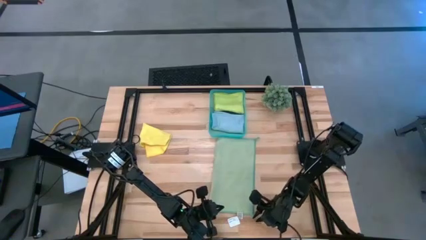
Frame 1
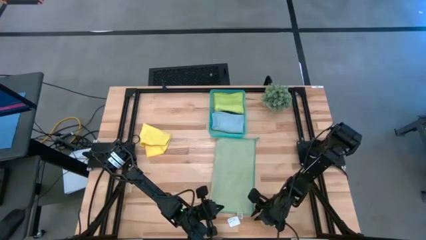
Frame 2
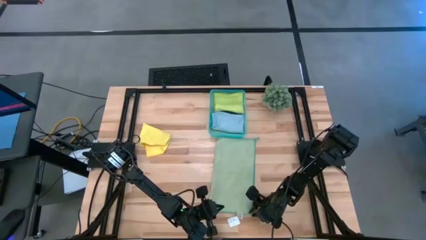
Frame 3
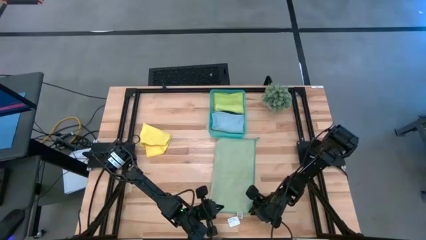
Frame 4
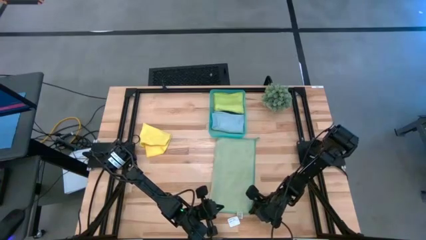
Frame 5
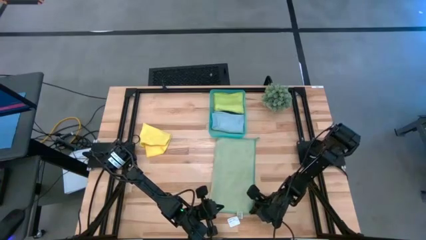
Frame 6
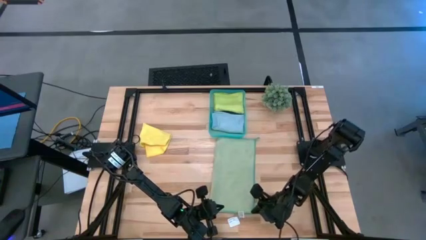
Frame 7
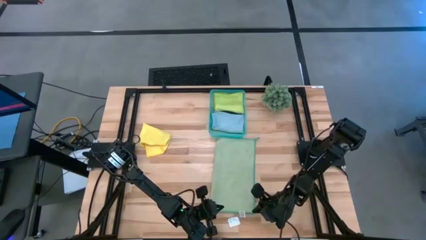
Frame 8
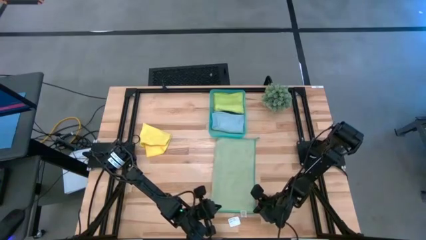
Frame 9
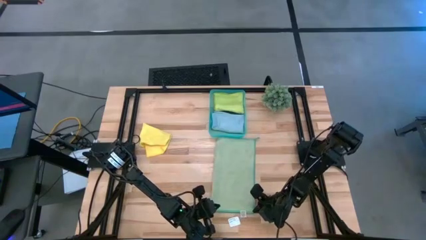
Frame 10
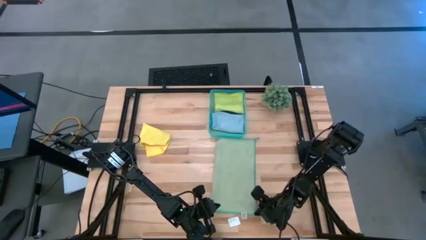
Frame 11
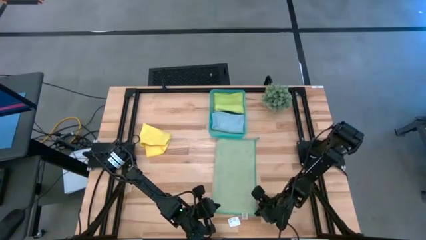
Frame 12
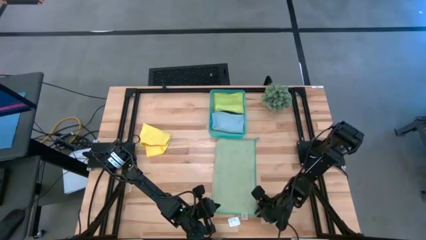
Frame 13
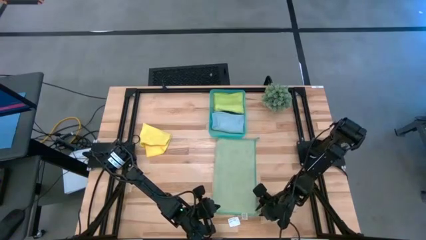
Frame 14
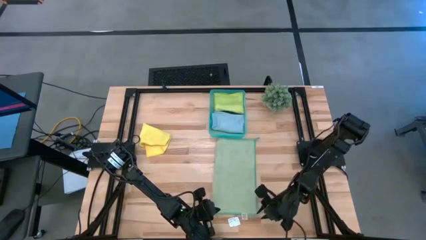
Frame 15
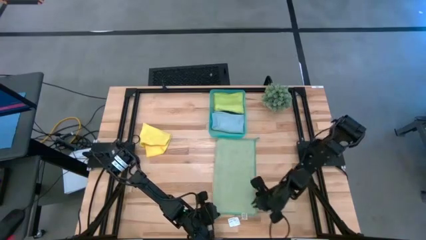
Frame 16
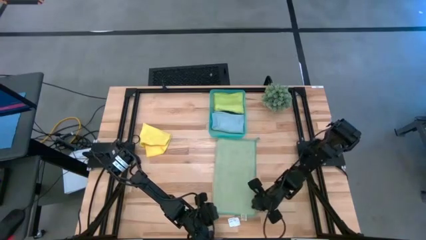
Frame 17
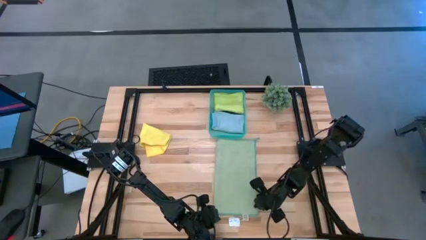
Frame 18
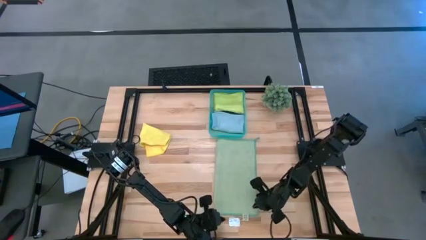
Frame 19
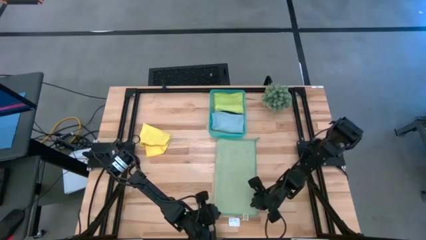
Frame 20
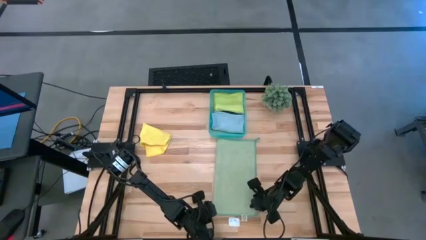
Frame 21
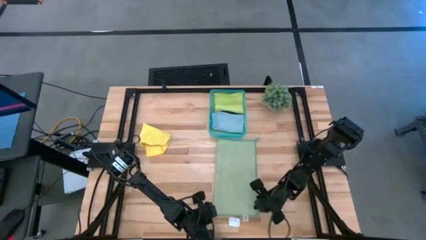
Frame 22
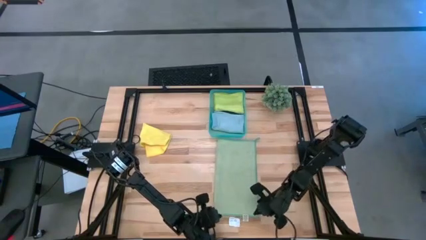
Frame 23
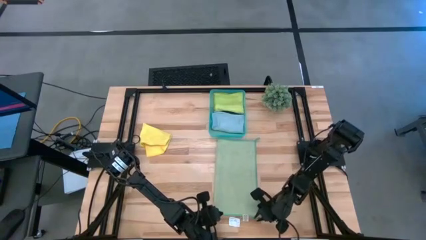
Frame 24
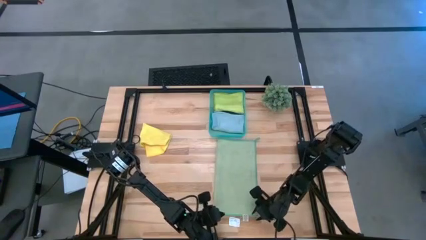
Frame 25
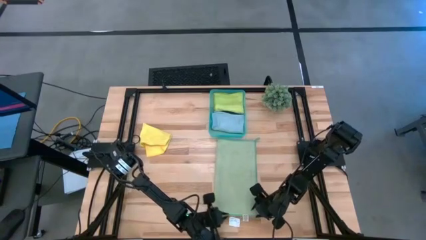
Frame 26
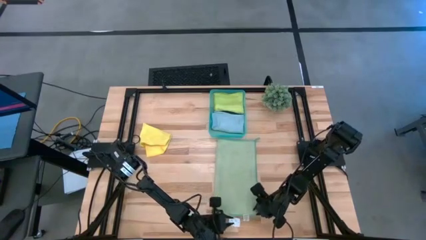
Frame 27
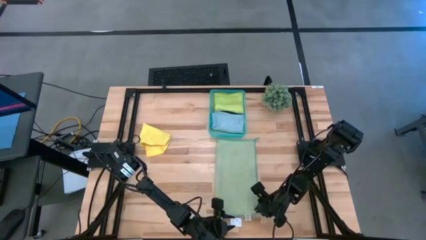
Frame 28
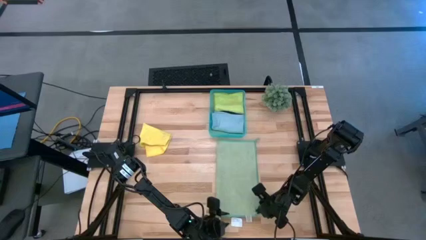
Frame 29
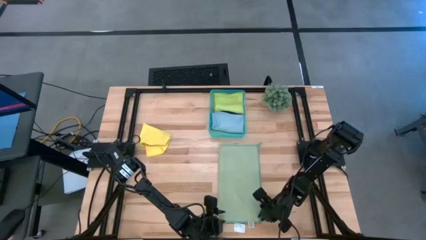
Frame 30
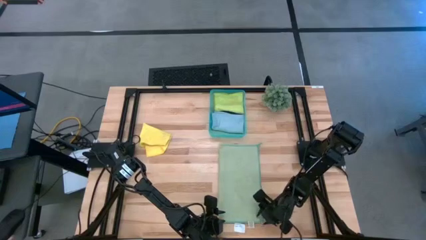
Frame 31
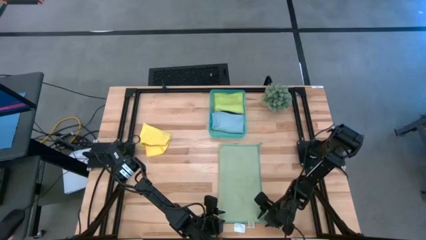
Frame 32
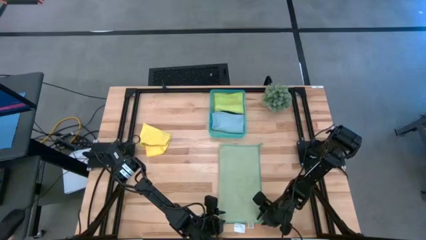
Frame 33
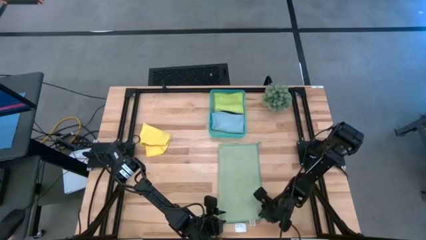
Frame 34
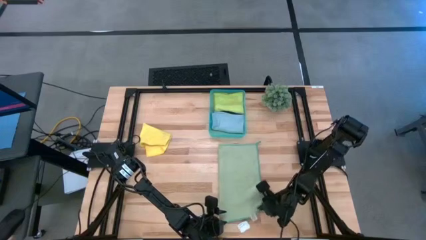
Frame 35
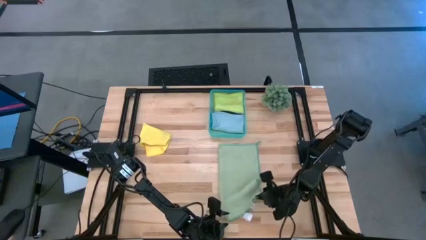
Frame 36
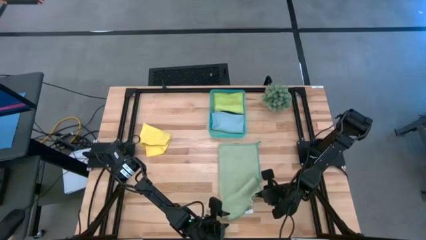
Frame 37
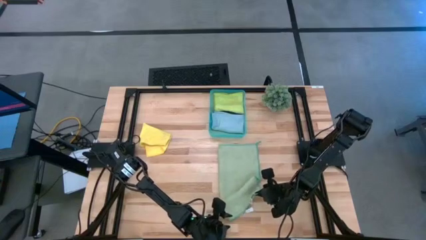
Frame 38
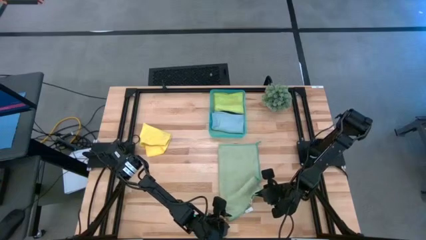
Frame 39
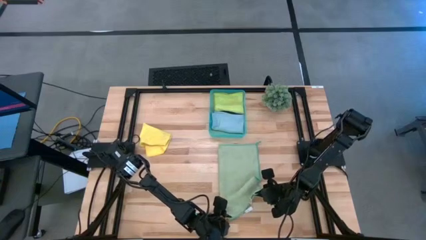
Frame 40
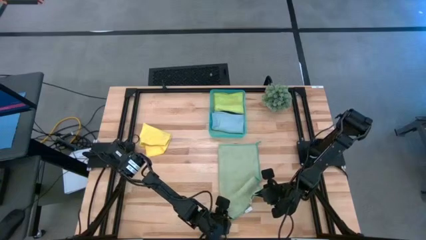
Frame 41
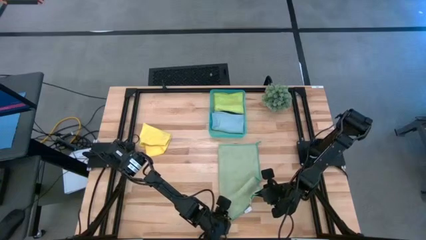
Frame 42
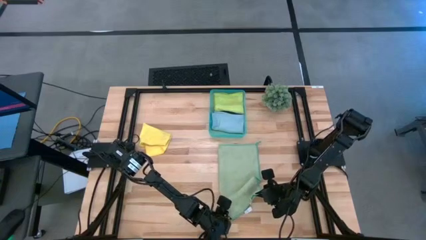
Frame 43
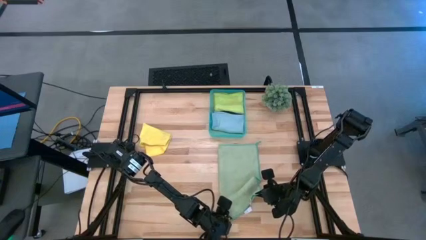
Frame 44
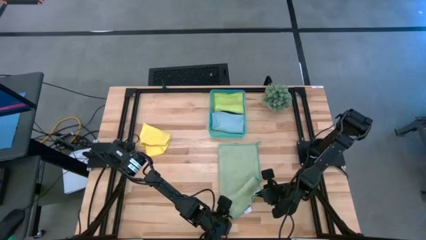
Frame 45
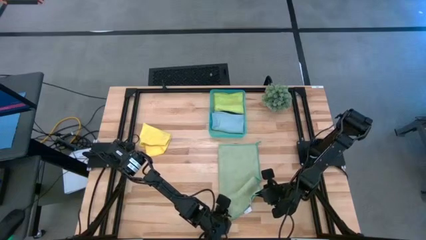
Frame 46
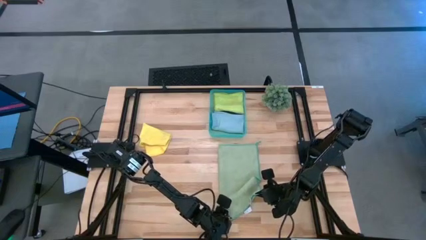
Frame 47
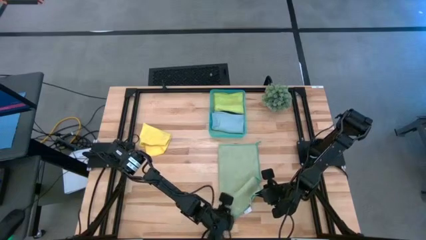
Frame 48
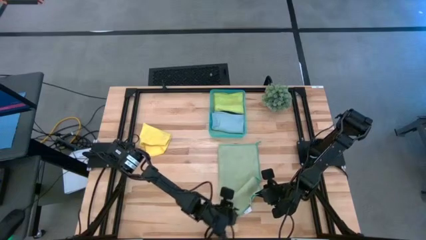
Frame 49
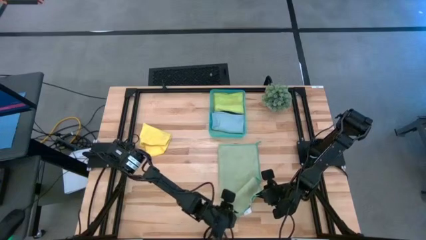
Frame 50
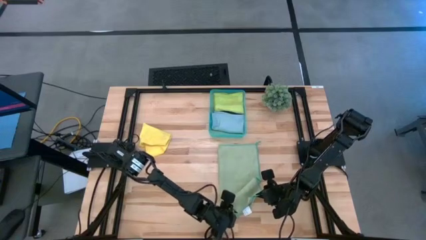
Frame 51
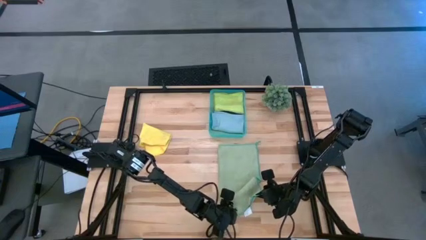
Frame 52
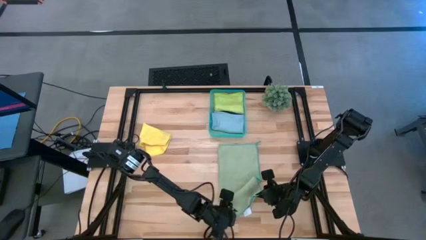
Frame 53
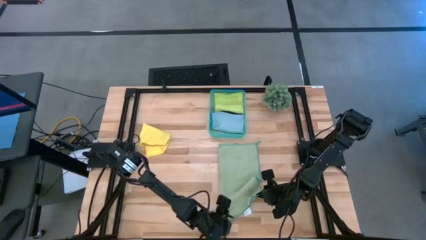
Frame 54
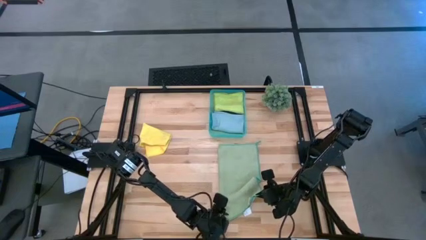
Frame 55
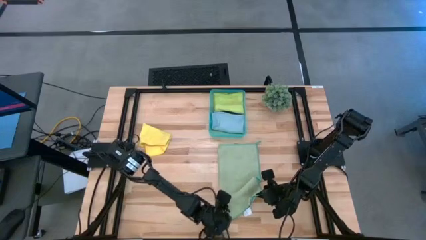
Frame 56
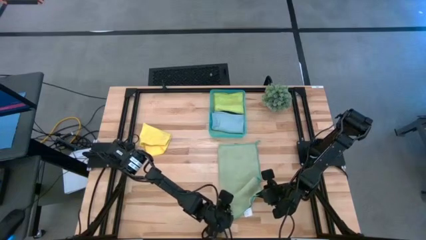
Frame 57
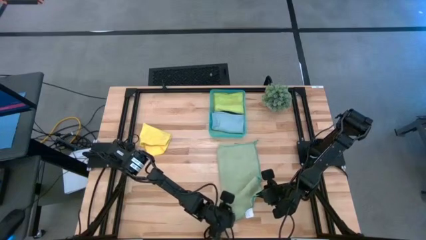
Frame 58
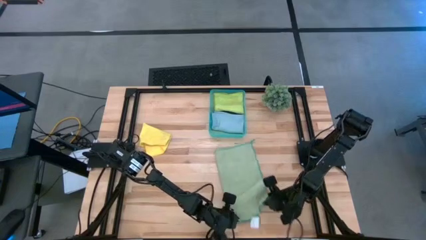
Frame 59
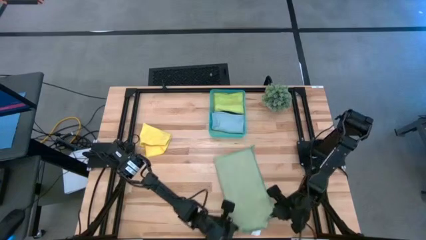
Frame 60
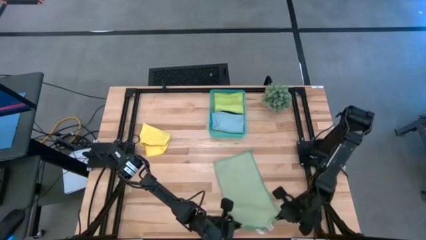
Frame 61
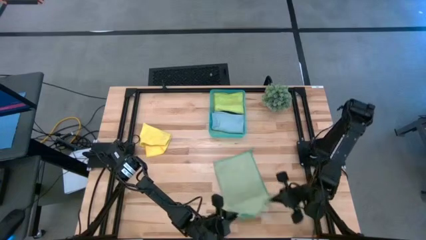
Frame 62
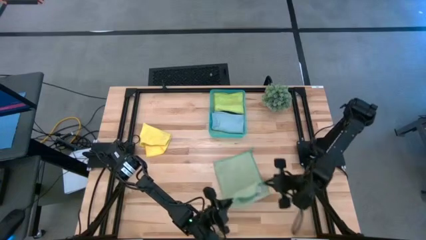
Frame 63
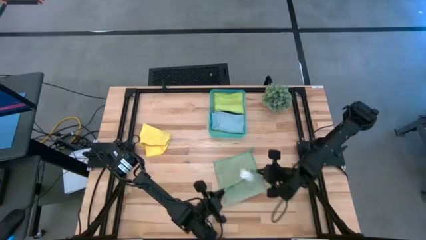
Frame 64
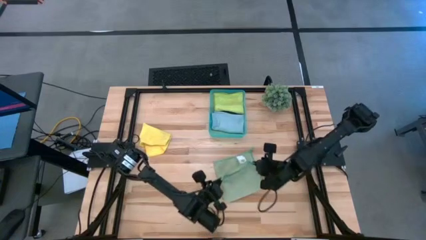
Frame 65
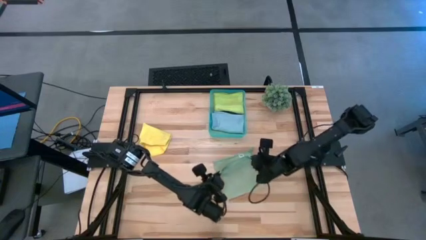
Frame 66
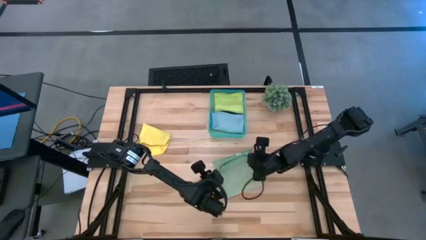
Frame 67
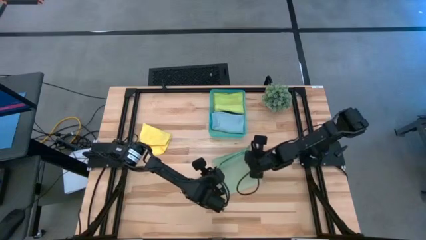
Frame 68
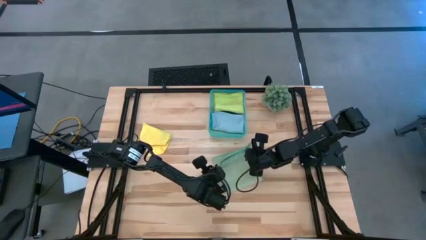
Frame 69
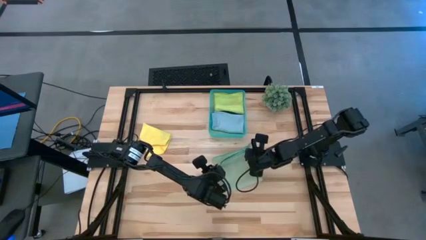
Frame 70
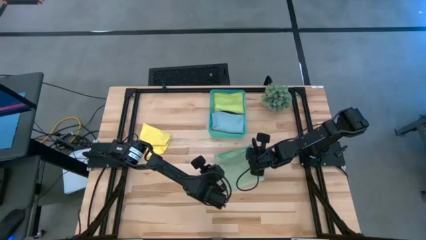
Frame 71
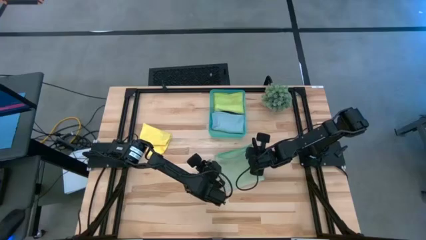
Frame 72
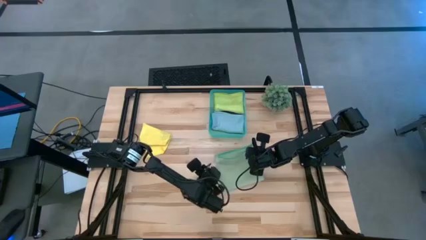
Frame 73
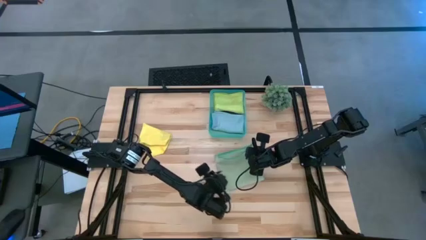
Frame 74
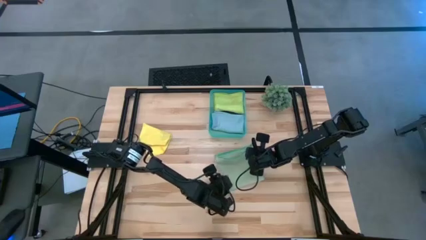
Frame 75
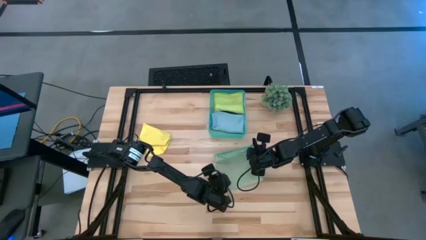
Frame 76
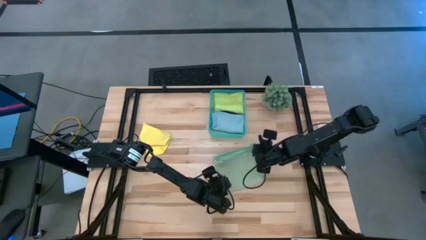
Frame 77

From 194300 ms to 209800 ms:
Task: Fold microfiber towels
Fold the green microfiber cloth
